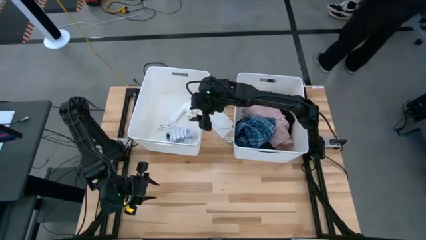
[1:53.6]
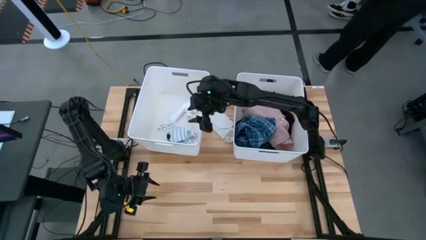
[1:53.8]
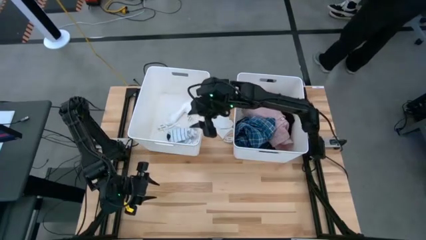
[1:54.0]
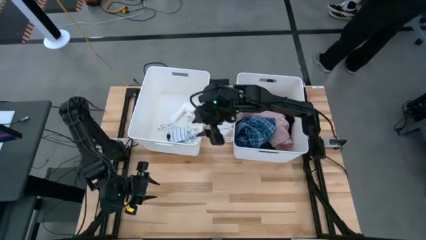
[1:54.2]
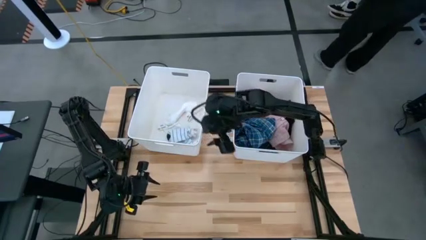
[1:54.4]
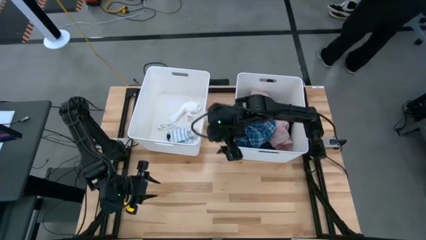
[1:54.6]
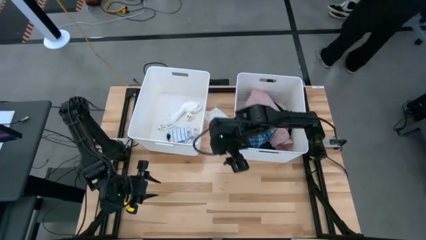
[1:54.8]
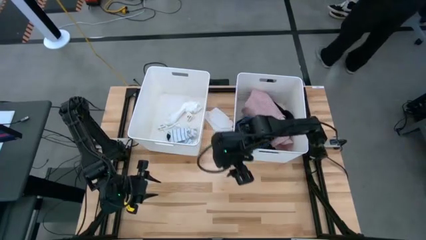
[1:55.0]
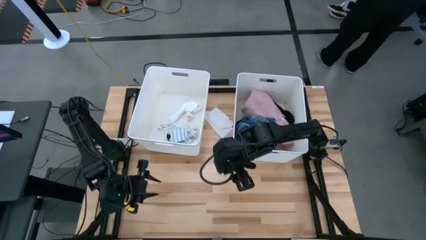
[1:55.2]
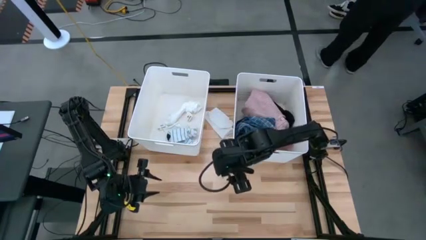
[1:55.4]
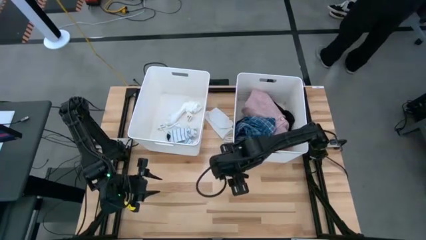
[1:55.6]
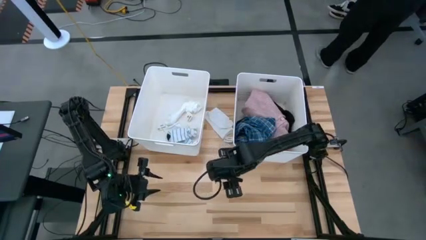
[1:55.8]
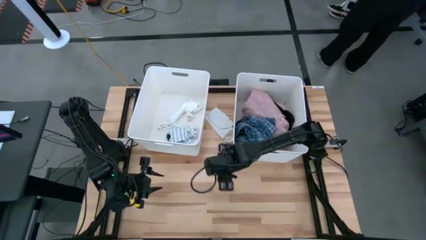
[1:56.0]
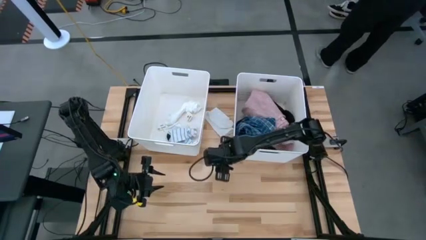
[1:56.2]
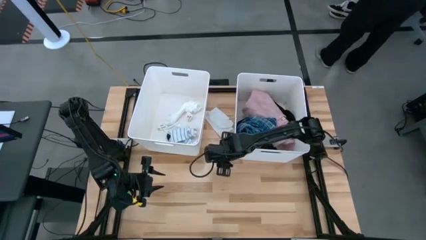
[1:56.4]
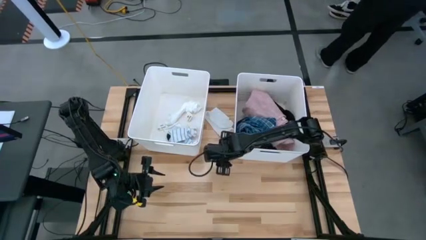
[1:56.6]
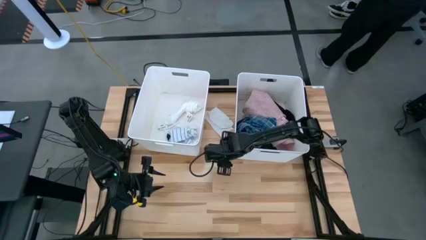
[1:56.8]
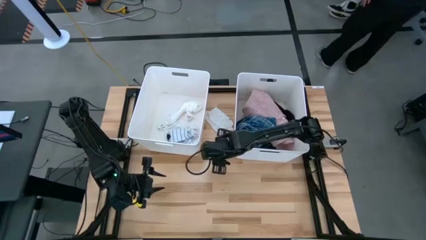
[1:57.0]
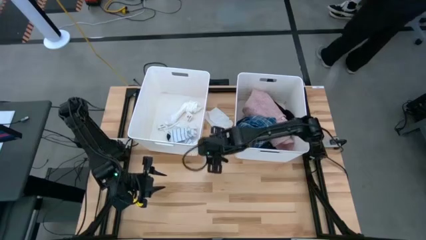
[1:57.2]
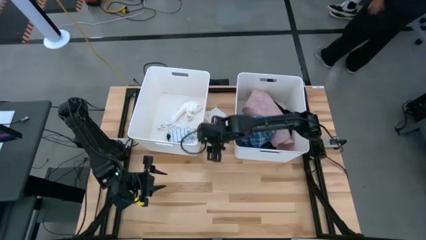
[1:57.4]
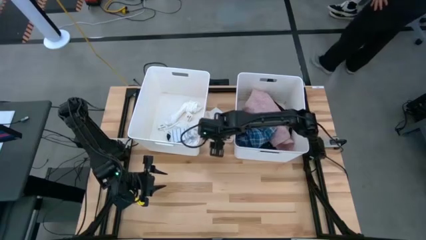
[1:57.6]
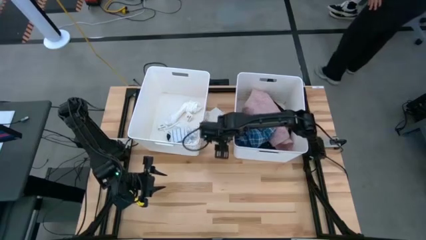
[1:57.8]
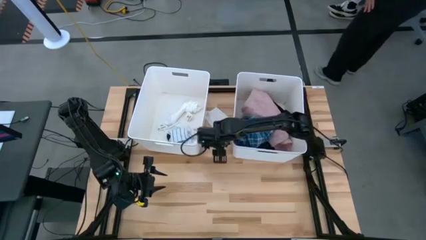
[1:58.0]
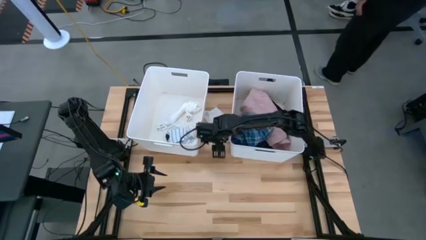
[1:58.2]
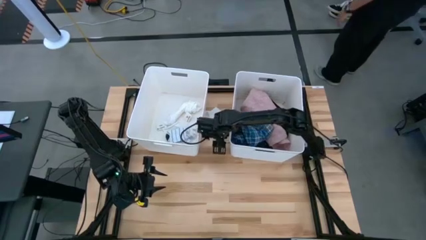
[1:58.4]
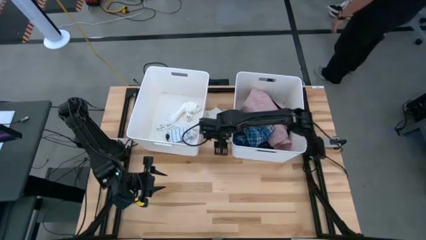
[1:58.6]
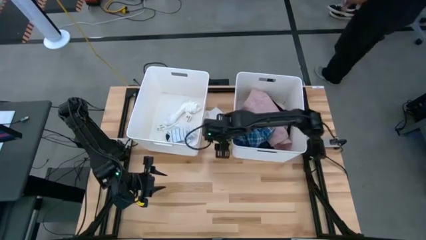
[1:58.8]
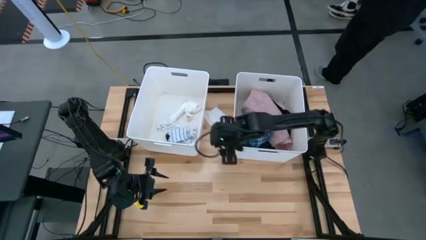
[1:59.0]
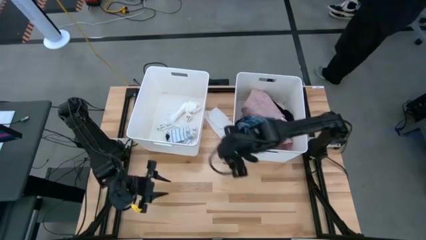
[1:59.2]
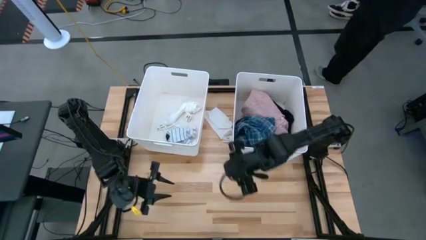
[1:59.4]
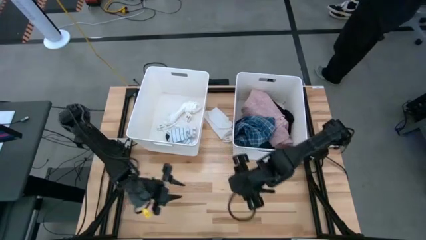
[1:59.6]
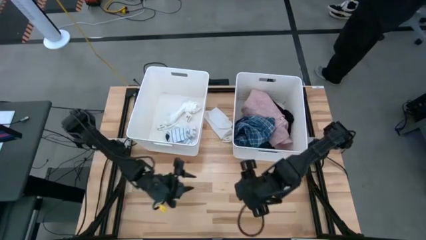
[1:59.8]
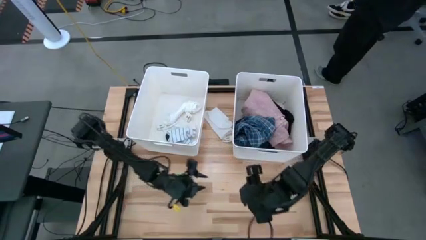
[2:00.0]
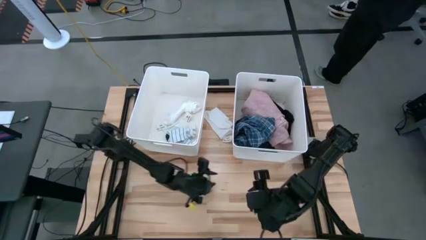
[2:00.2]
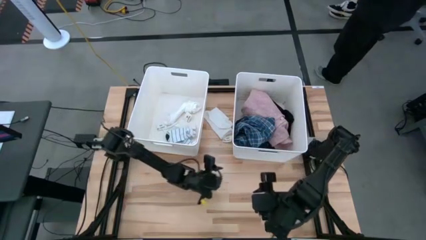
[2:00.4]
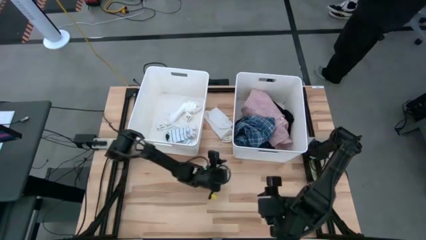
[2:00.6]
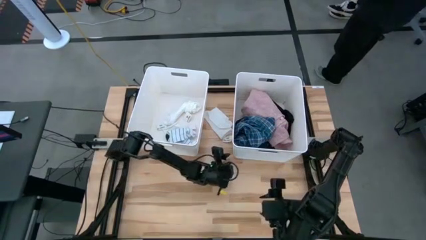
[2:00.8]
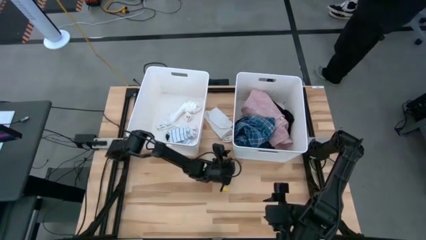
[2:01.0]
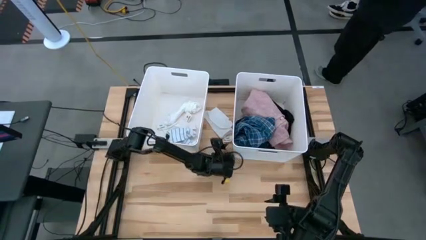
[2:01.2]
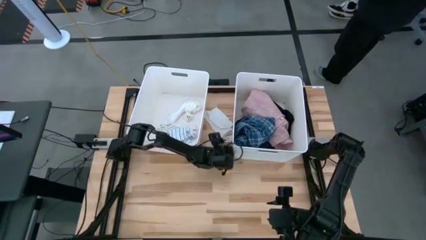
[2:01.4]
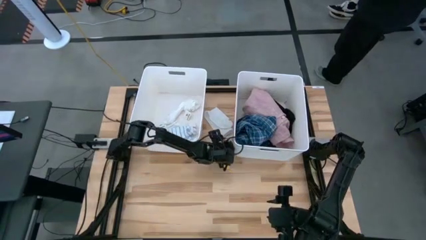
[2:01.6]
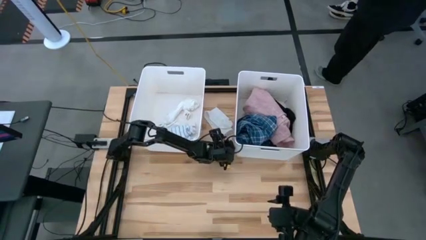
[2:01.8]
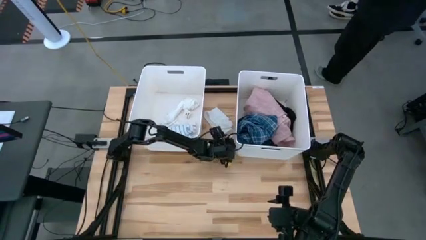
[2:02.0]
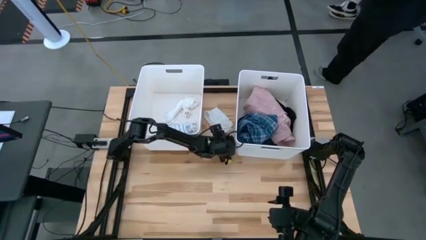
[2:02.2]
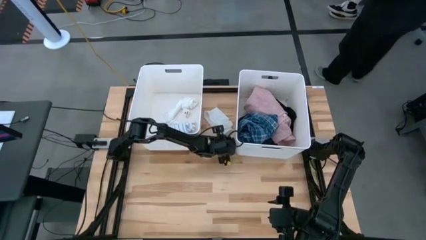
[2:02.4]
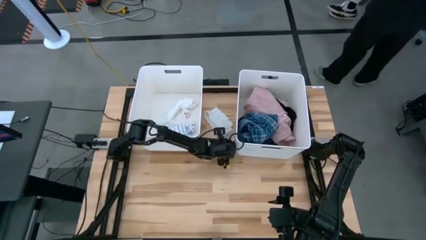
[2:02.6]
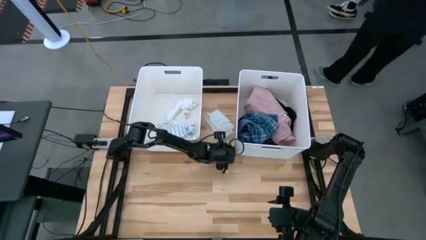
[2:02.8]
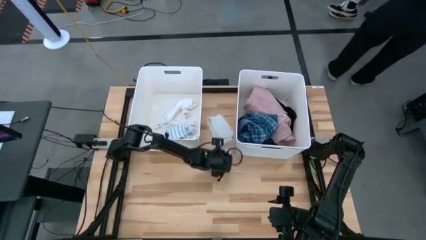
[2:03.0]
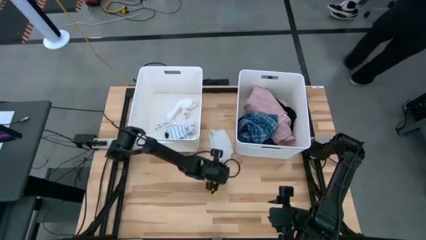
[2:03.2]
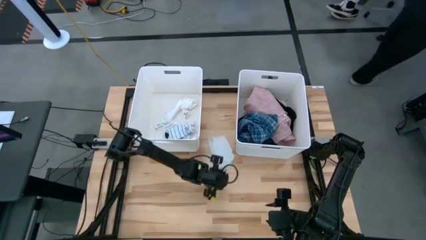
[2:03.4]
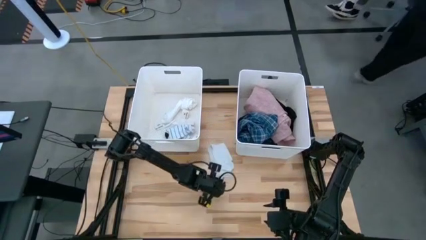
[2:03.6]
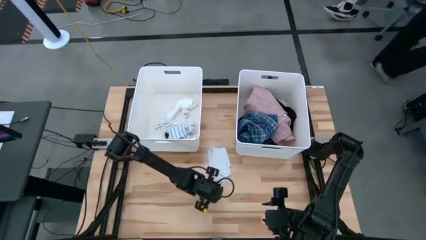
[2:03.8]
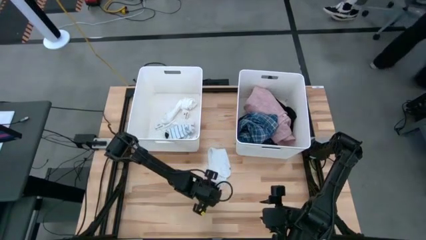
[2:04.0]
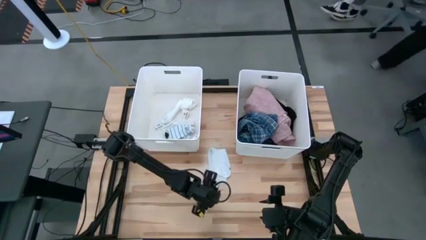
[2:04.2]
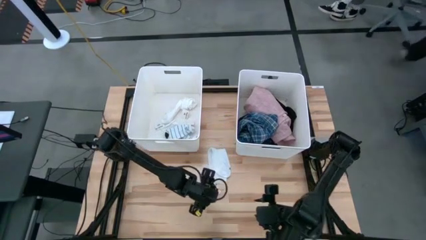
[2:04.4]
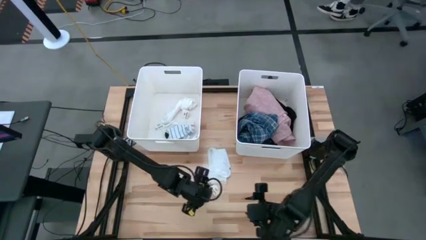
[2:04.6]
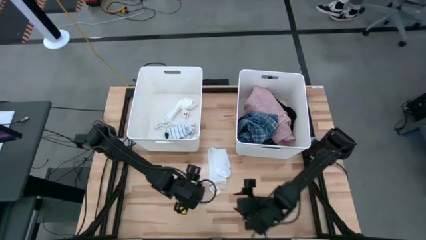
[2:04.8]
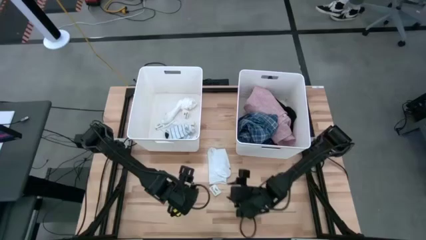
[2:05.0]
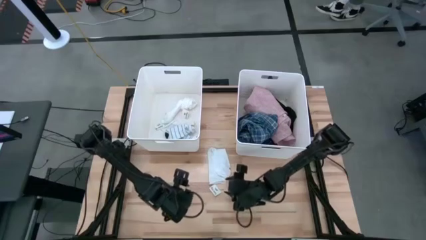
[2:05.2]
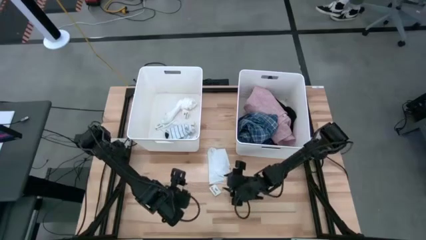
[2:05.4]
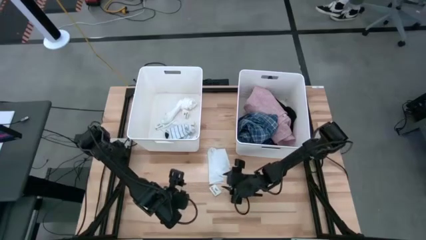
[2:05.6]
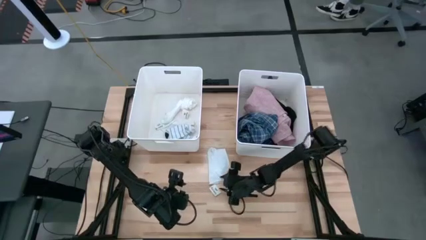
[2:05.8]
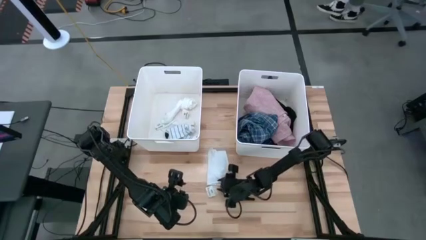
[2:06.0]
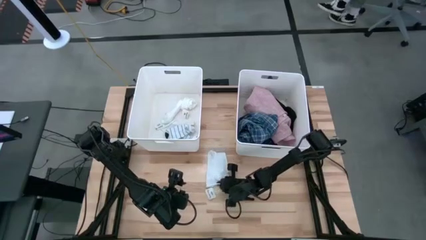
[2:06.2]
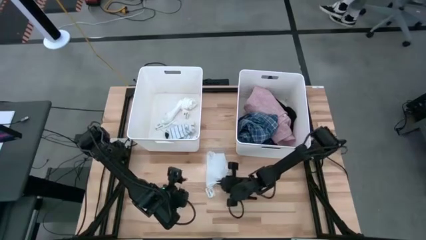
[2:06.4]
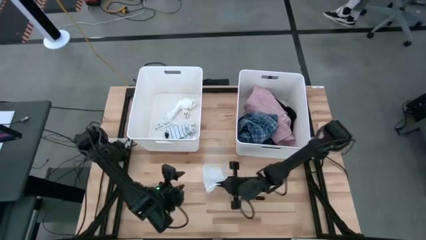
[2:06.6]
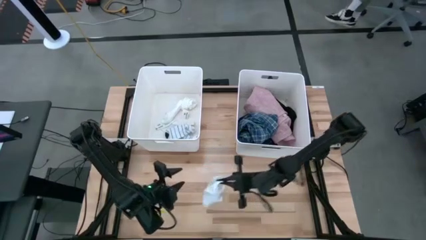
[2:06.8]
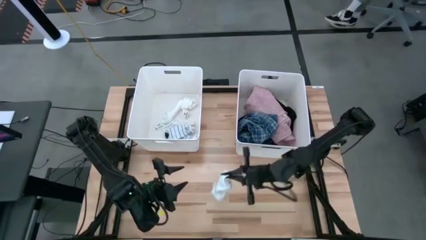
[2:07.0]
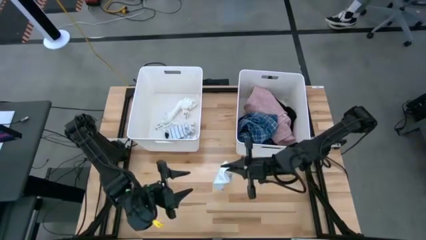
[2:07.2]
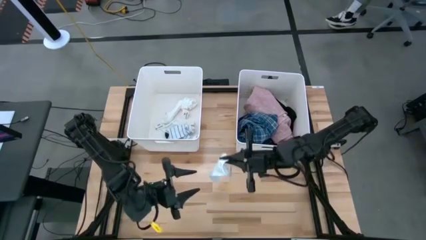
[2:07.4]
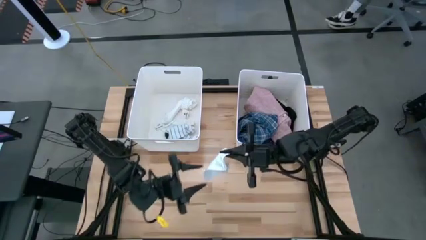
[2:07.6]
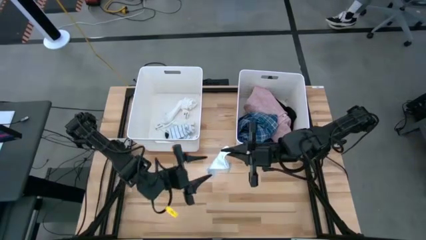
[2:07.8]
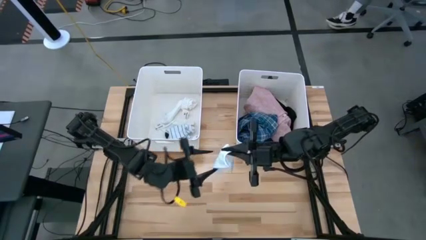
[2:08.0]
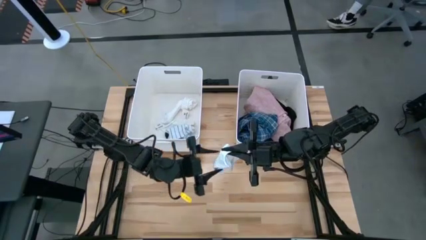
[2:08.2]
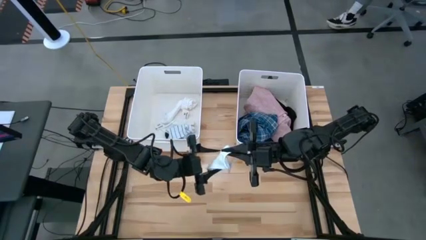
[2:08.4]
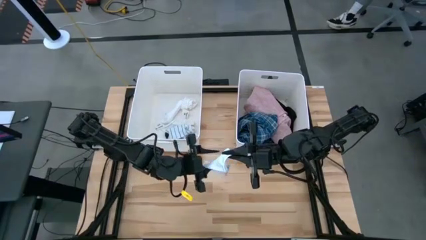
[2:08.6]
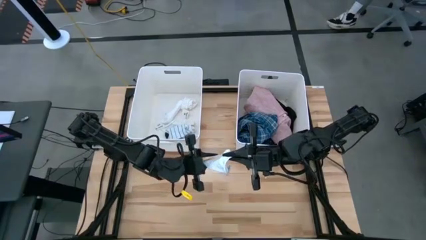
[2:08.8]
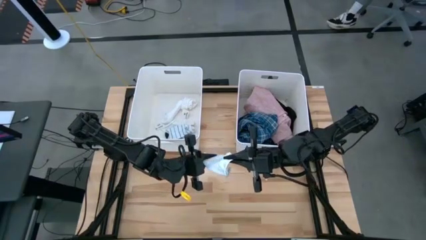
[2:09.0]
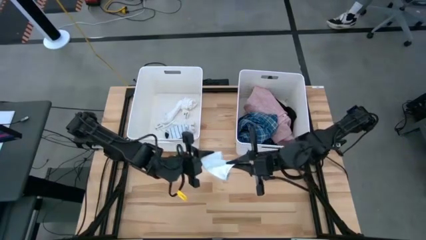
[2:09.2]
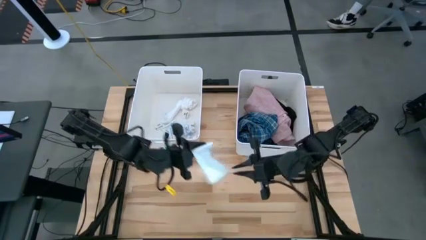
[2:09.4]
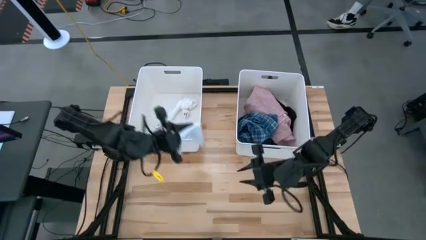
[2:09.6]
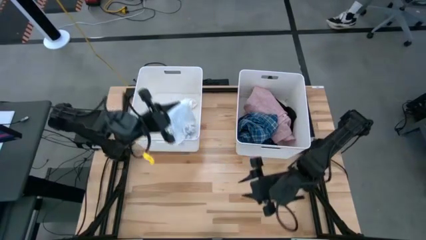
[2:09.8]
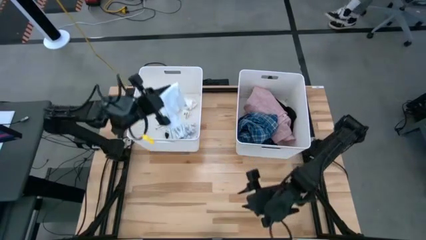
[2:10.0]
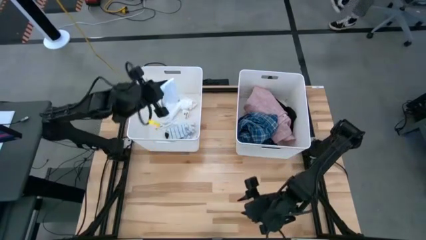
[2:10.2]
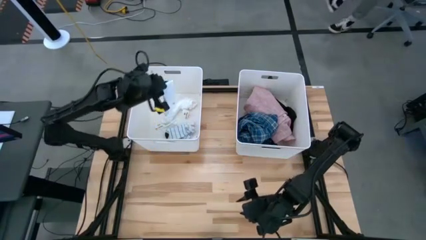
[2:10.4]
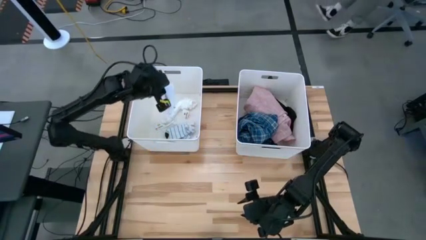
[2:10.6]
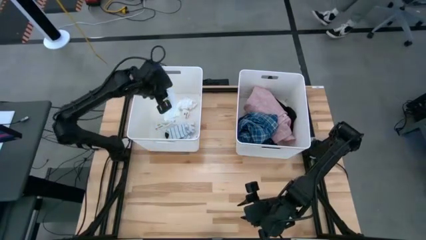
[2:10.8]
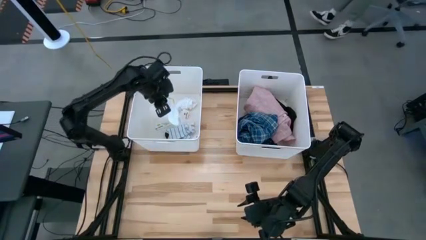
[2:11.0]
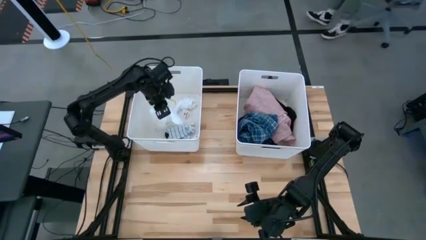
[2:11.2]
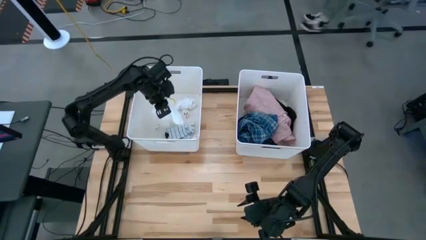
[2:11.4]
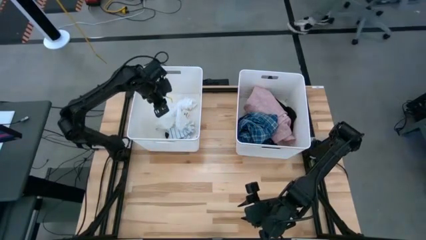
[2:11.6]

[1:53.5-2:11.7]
Task: Sort clothes
Put the white sock in the left white laundry bin
